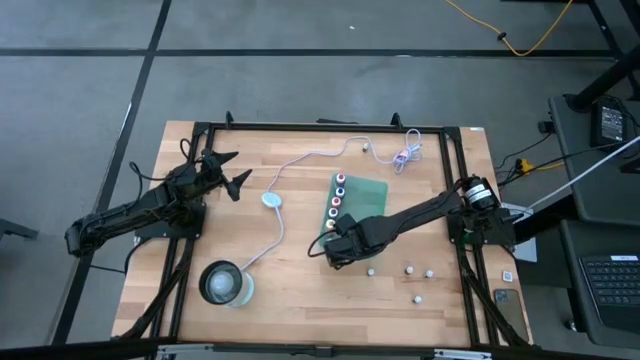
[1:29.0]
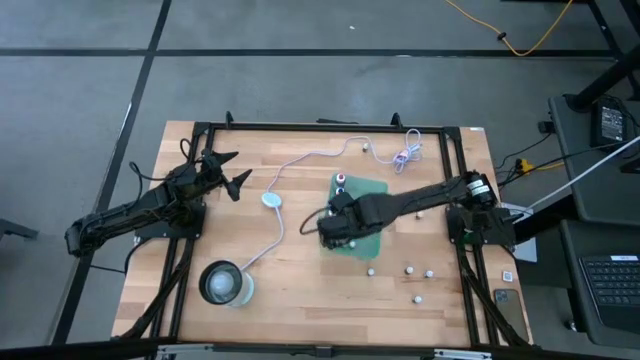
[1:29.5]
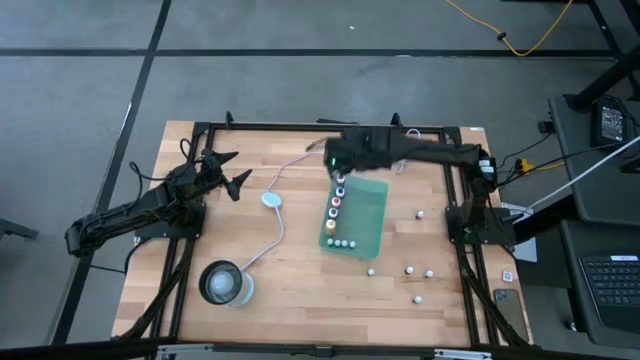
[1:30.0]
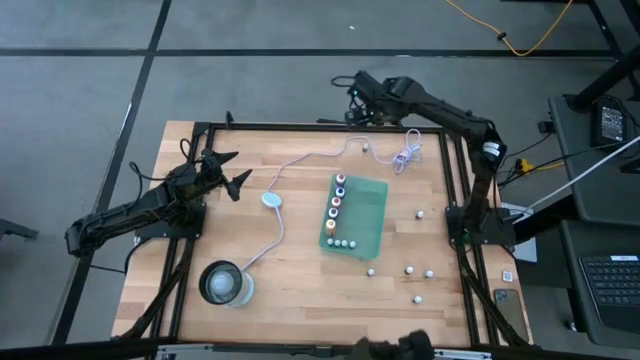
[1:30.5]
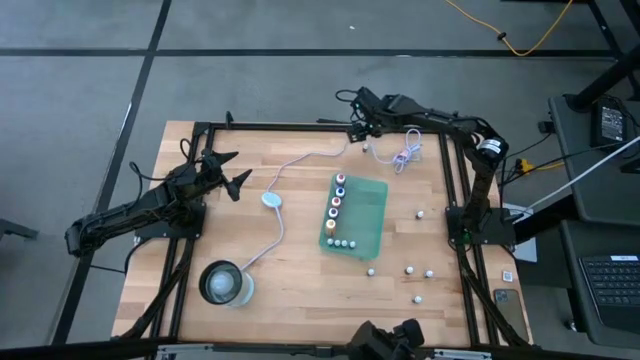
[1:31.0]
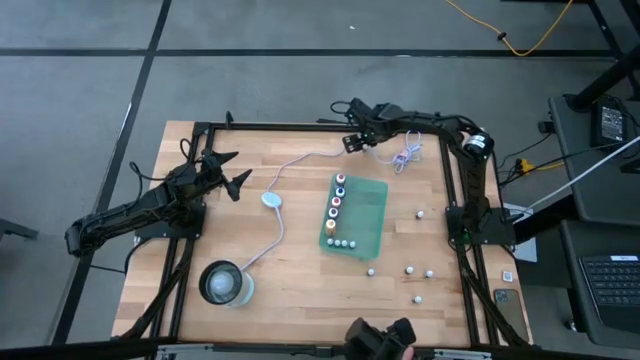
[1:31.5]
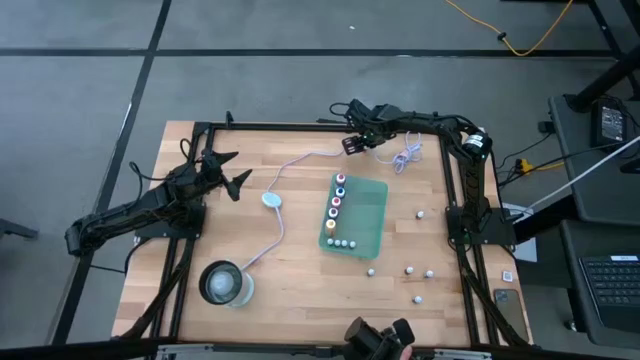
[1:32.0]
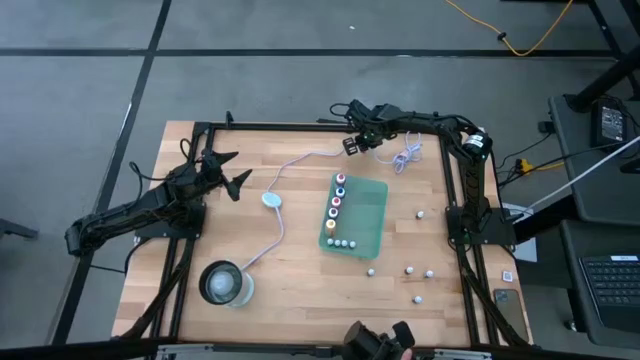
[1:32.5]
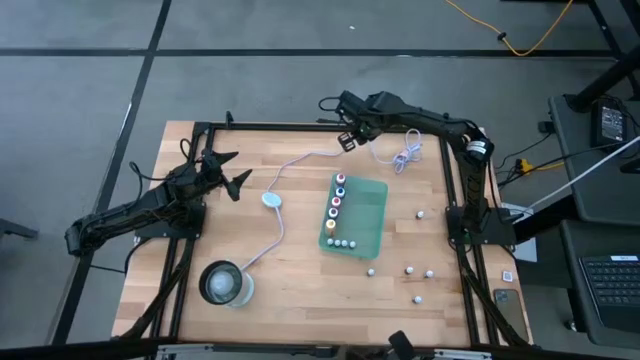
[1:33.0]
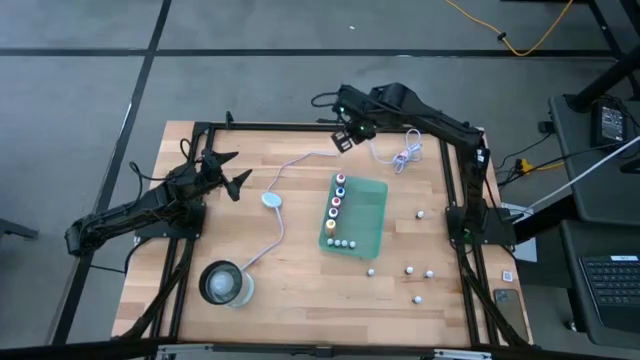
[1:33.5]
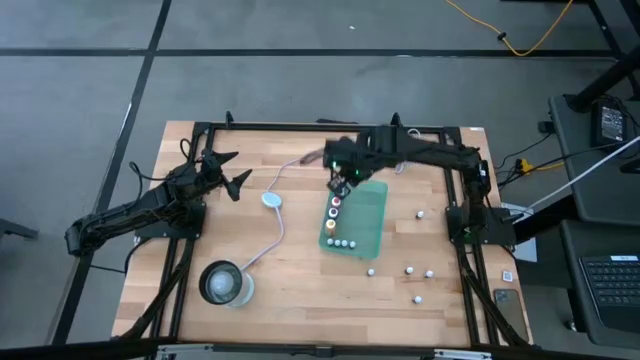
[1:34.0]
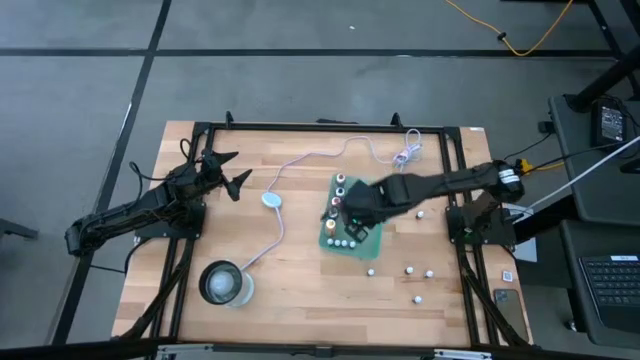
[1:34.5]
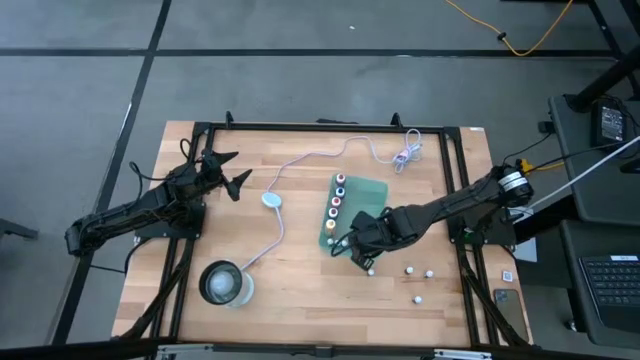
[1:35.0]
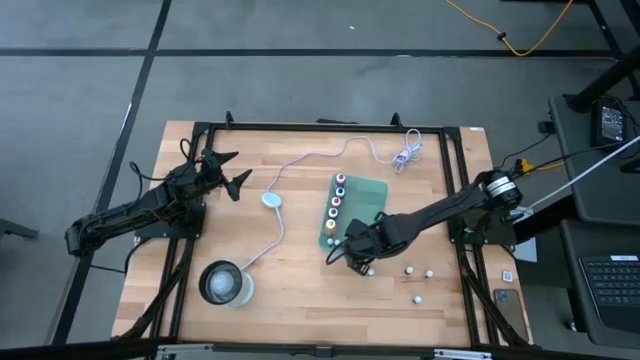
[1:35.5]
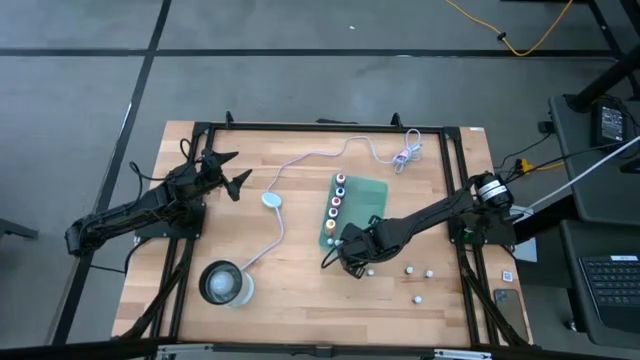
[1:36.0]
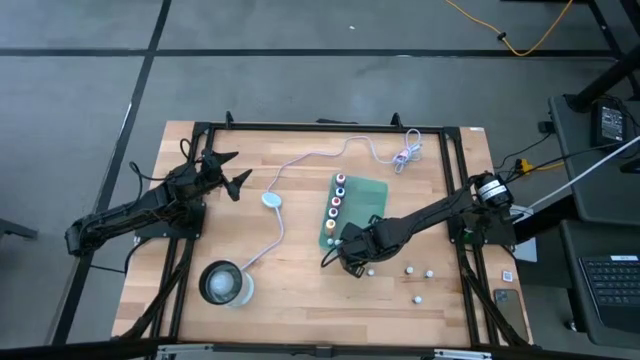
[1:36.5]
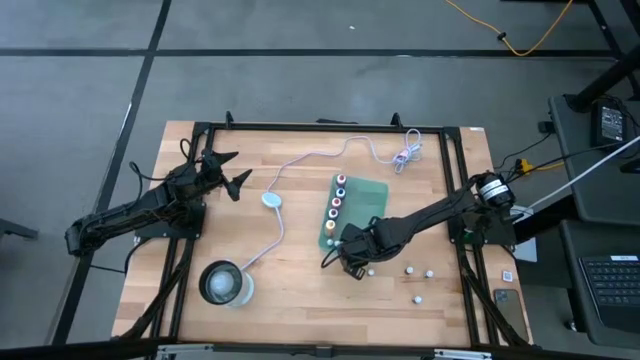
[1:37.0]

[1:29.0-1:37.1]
Task: Pick & Place food coloring
Put the small red food coloring bottle into the green bin

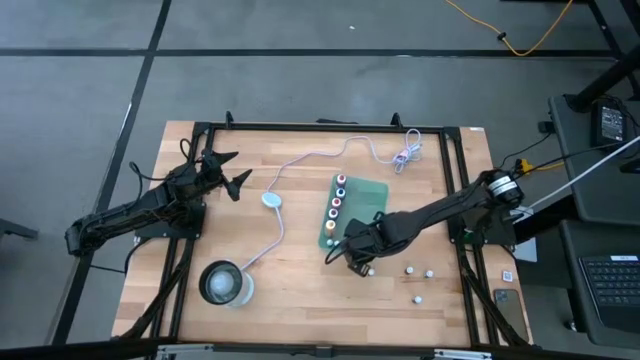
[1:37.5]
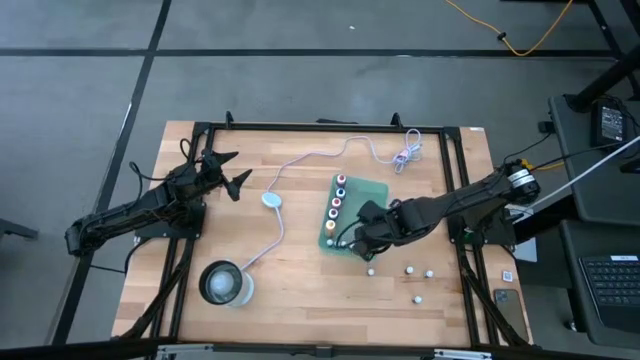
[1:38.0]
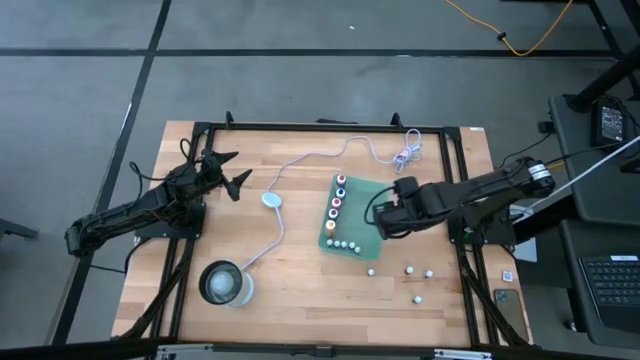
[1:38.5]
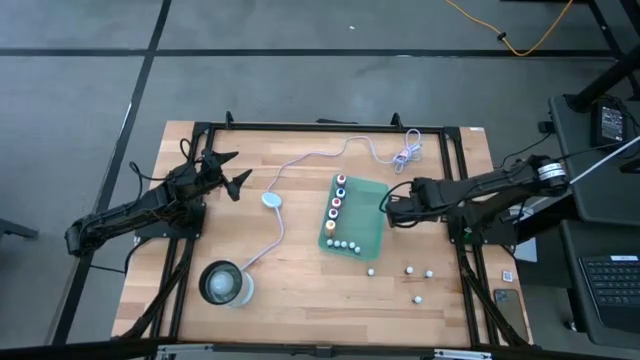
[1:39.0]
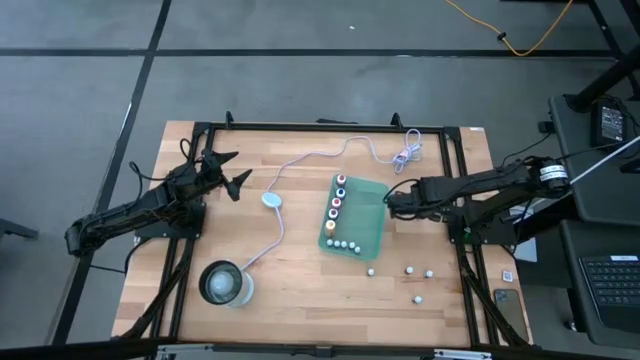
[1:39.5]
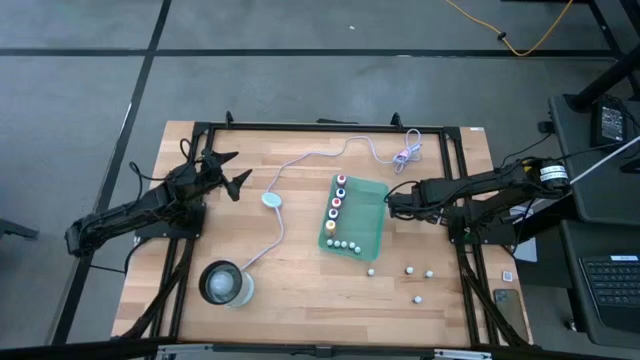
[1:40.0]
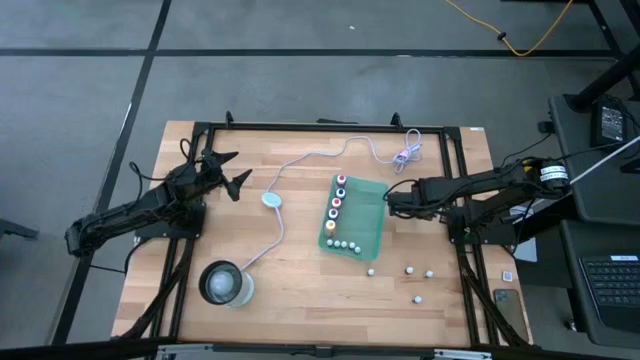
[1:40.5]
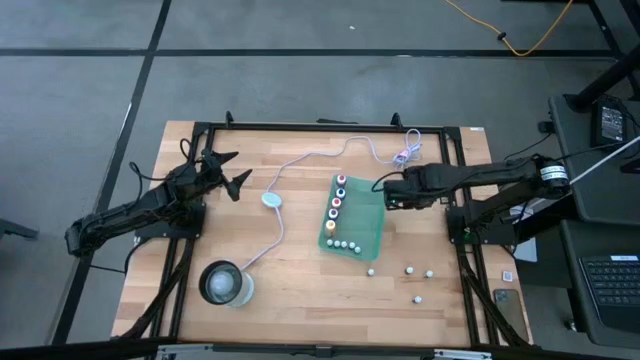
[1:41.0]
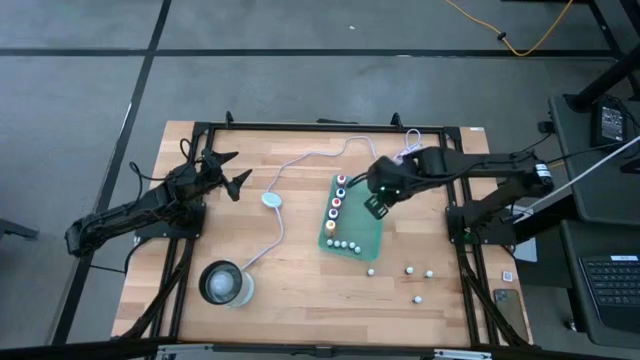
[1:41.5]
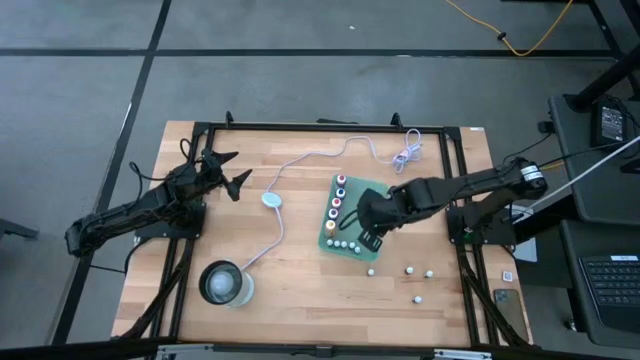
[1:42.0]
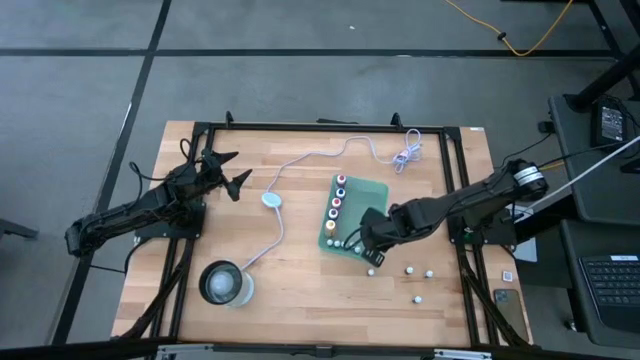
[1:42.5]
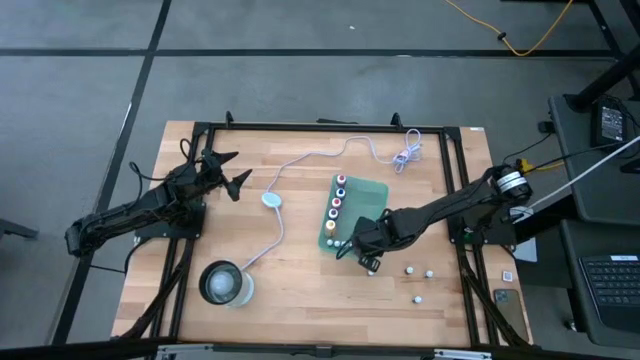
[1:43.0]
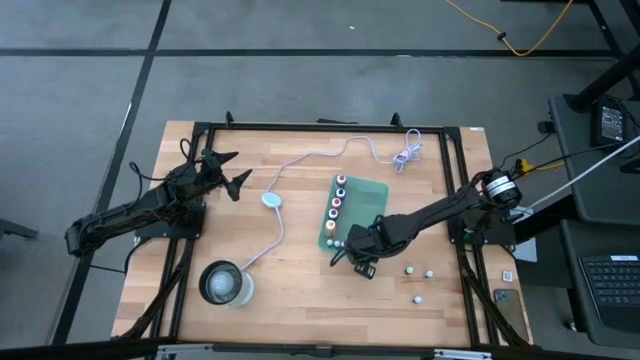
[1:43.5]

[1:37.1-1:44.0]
Put the small pink food coloring bottle into the green bin

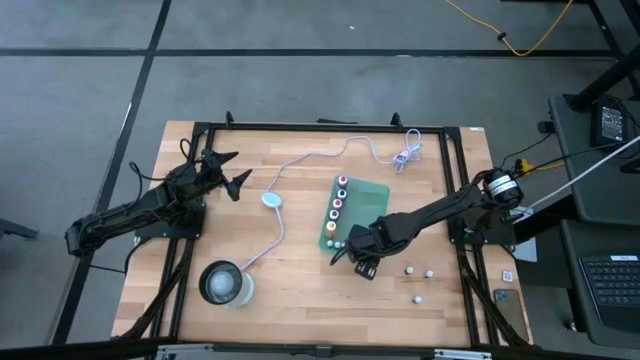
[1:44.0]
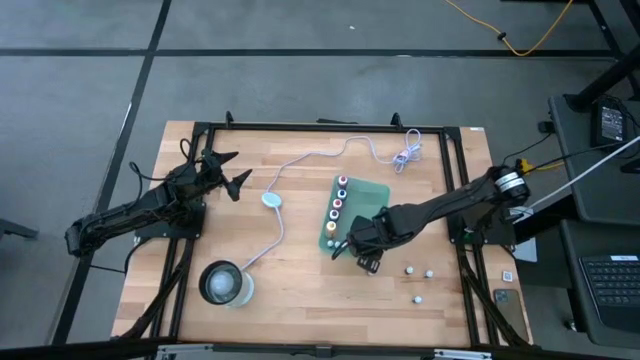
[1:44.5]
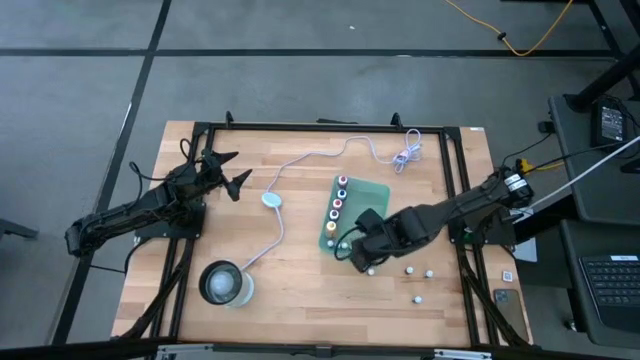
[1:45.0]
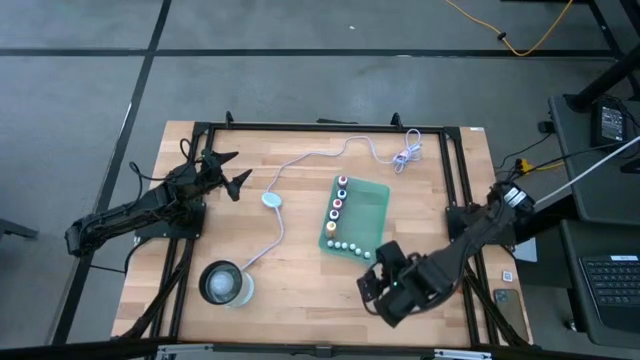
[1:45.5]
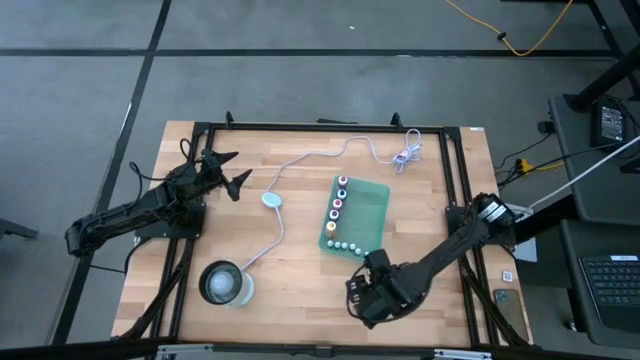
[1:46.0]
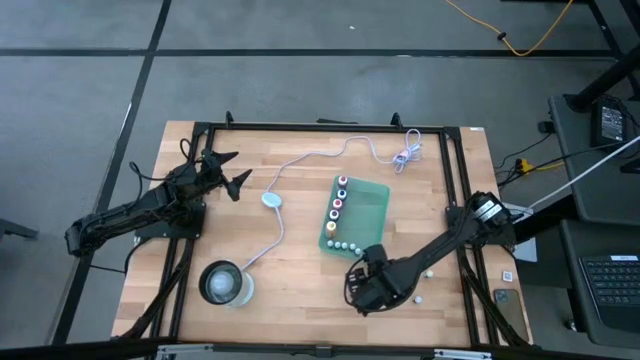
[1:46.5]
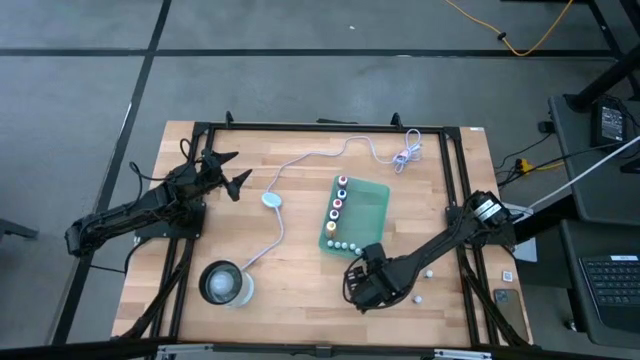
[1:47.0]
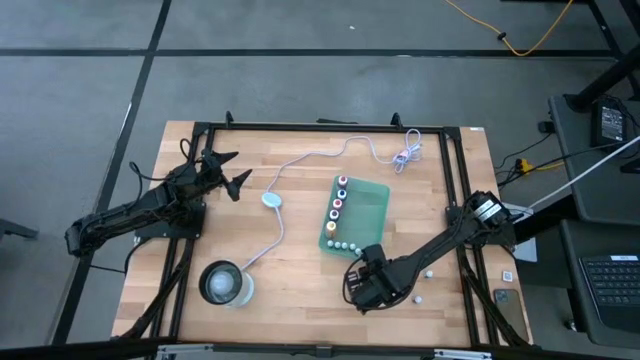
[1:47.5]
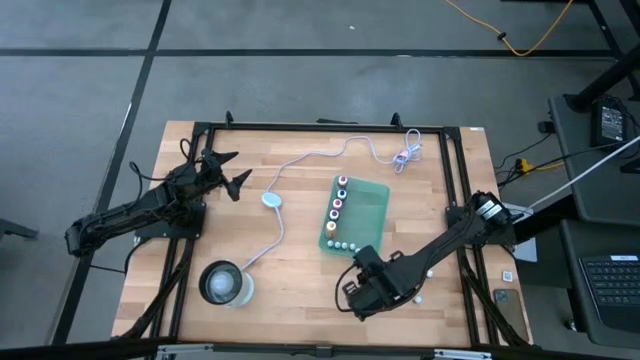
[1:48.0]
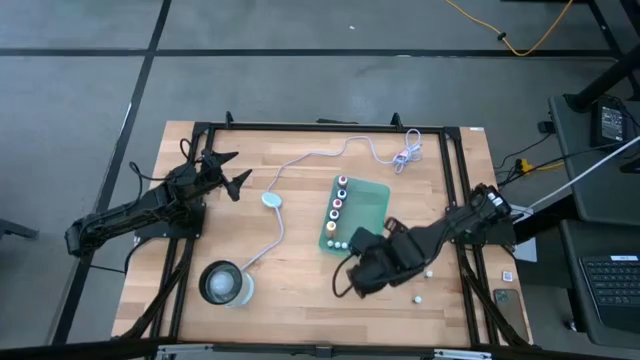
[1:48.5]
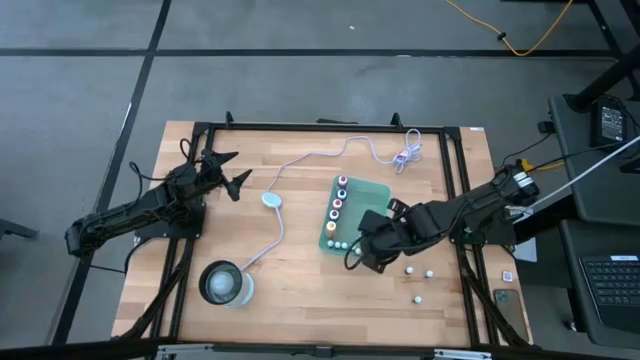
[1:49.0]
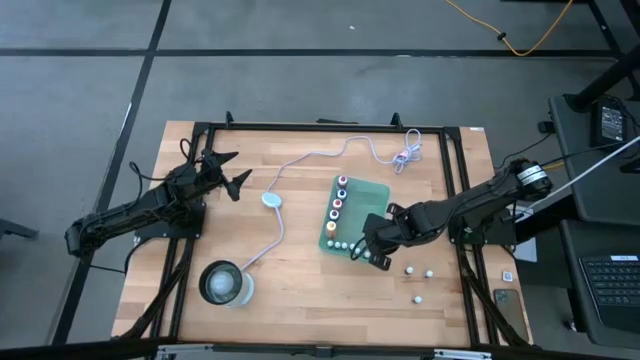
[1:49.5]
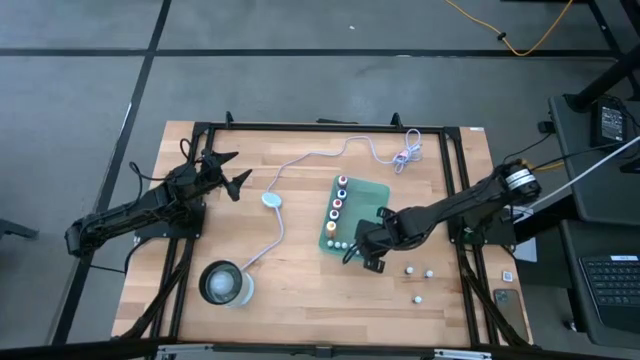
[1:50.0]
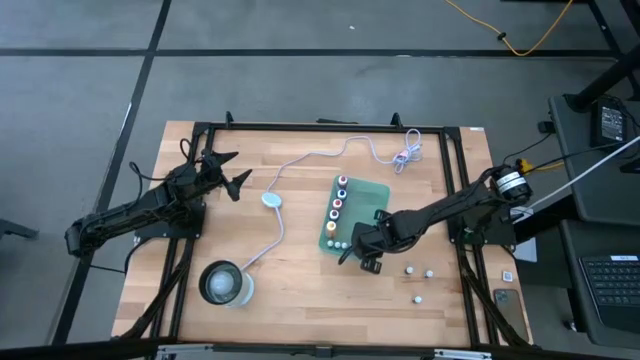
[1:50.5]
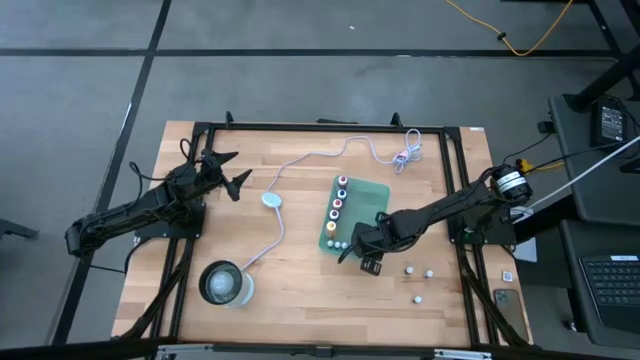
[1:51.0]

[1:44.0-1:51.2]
Put the small brown food coloring bottle into the green bin

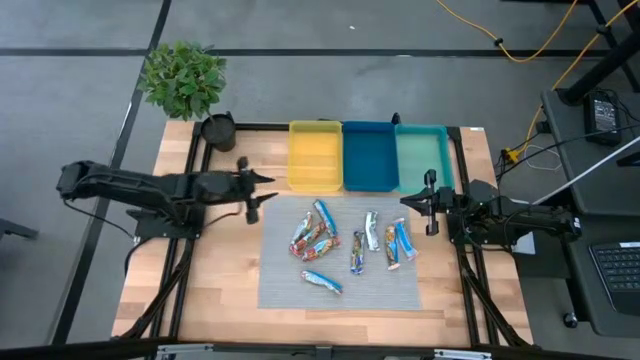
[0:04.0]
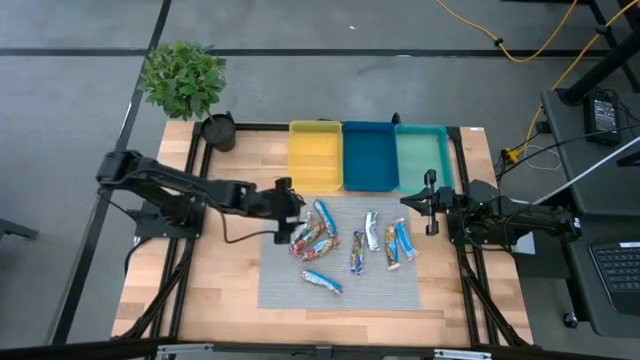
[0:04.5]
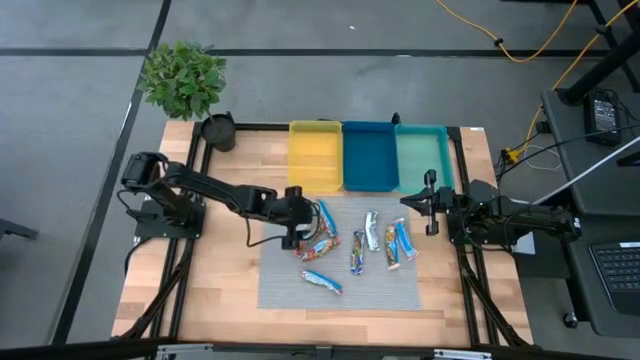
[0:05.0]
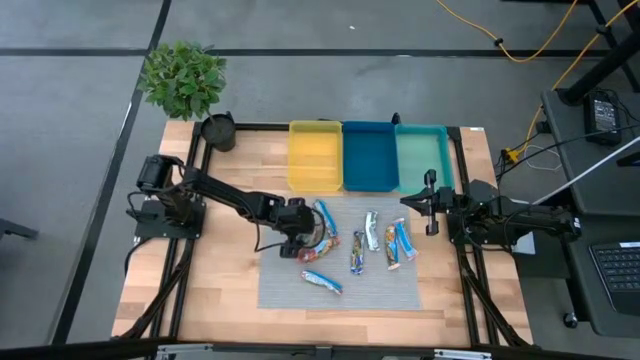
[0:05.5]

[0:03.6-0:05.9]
Task: Pick and place Granola Bars by type
Adjust the left red granola bar on the mat
